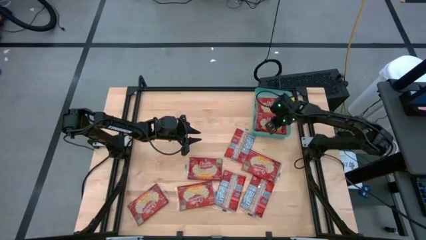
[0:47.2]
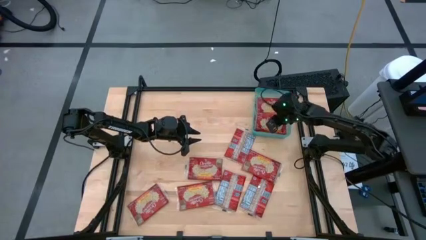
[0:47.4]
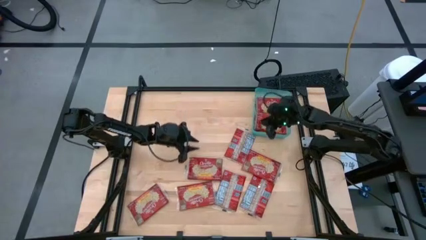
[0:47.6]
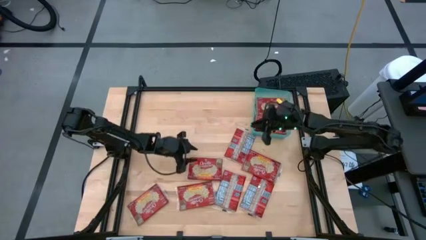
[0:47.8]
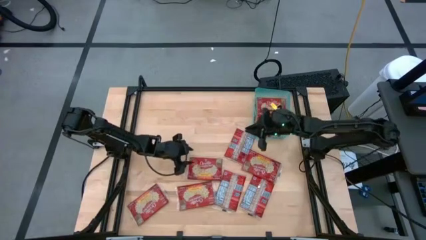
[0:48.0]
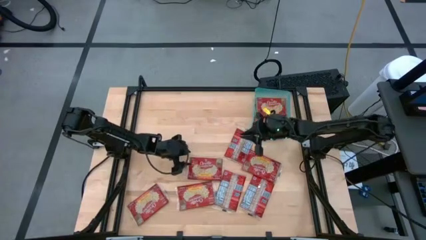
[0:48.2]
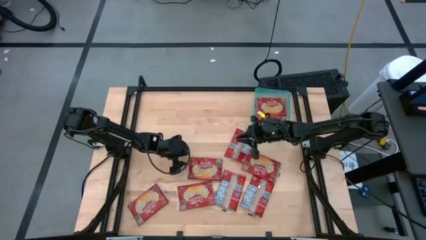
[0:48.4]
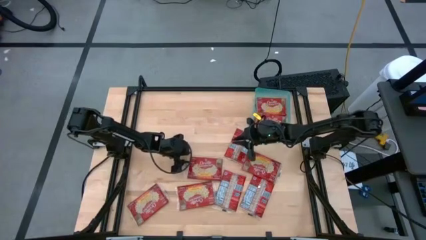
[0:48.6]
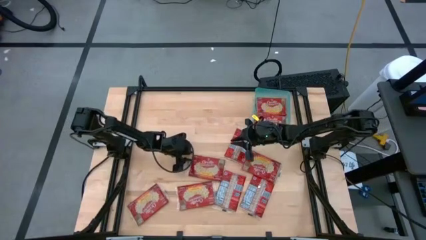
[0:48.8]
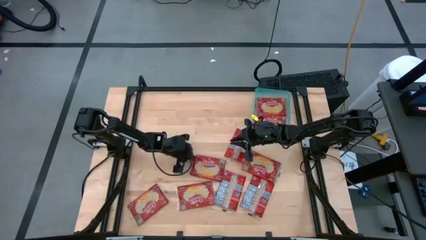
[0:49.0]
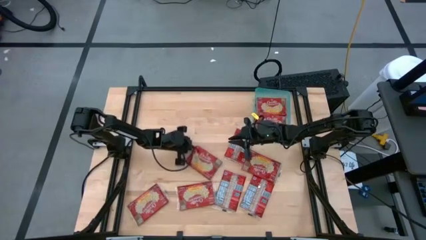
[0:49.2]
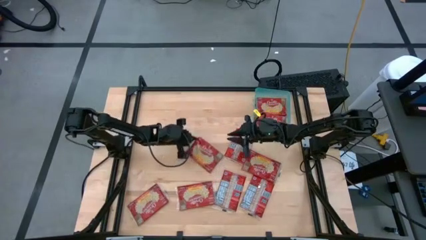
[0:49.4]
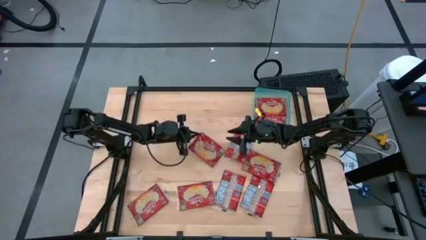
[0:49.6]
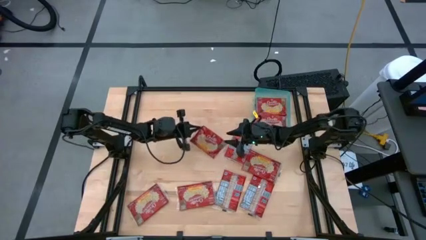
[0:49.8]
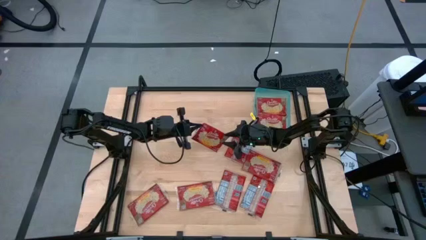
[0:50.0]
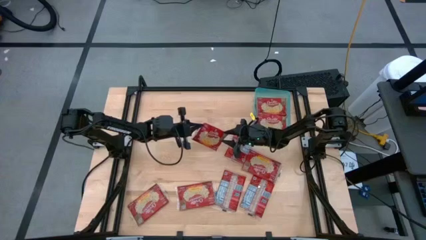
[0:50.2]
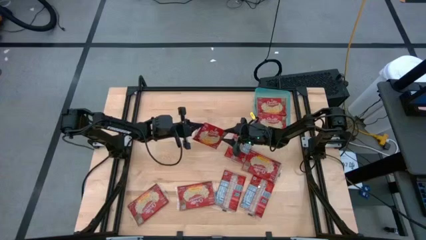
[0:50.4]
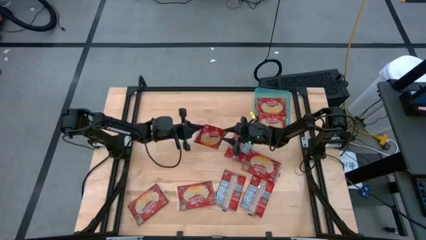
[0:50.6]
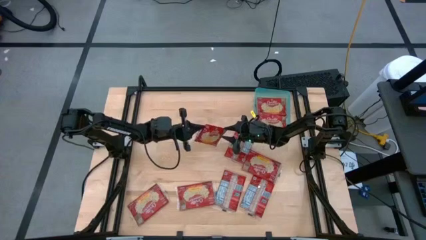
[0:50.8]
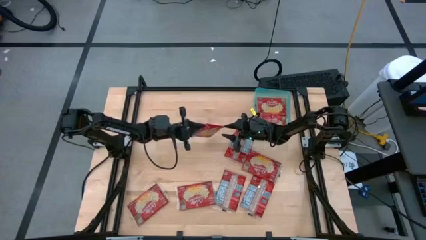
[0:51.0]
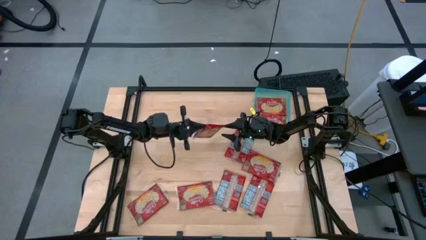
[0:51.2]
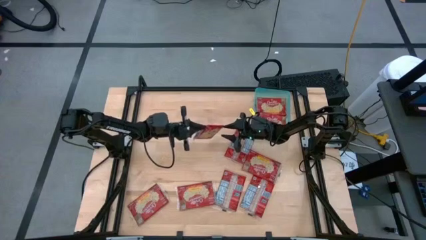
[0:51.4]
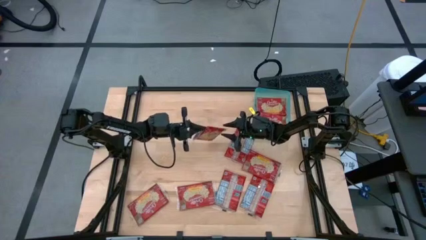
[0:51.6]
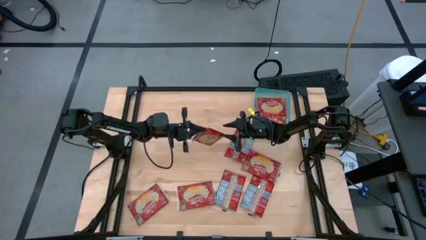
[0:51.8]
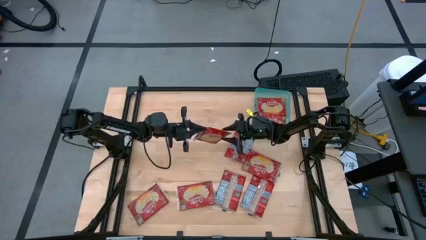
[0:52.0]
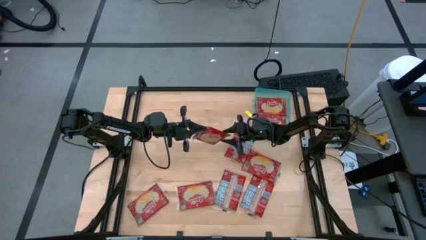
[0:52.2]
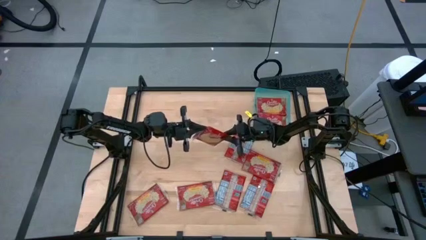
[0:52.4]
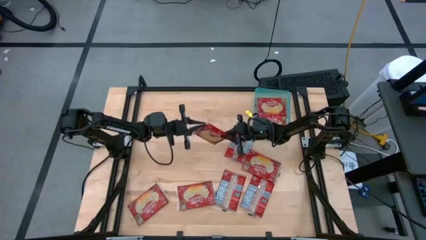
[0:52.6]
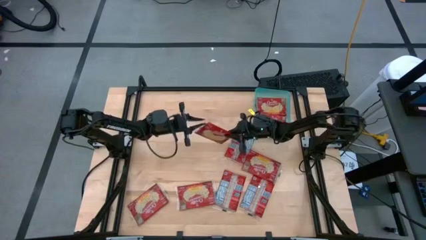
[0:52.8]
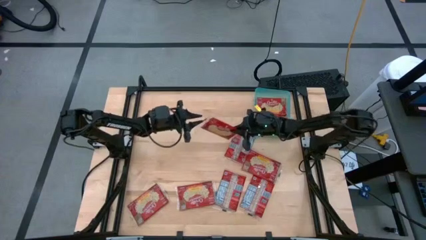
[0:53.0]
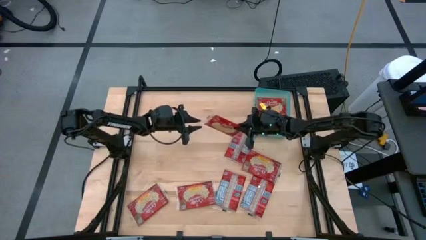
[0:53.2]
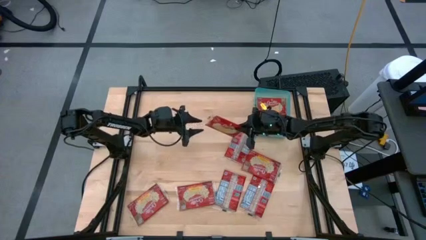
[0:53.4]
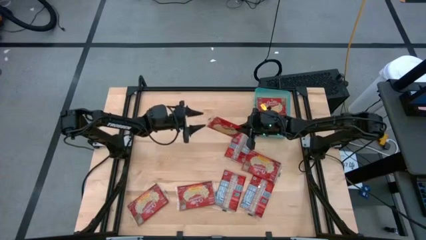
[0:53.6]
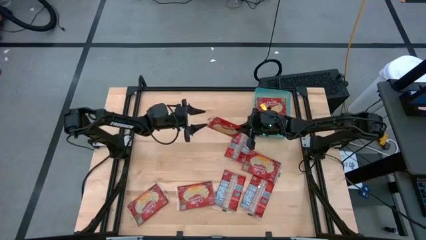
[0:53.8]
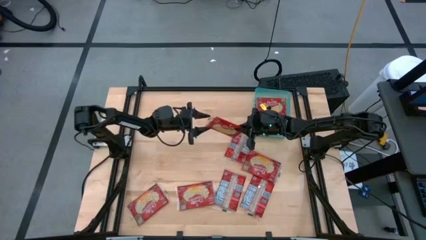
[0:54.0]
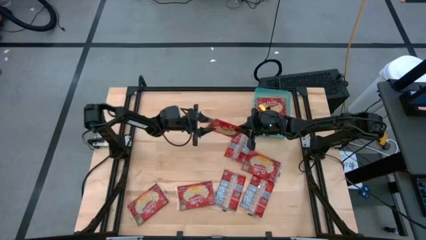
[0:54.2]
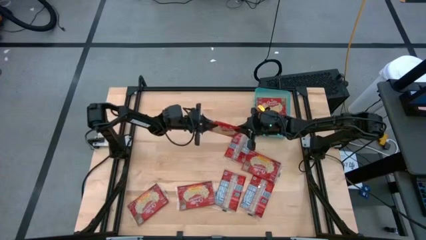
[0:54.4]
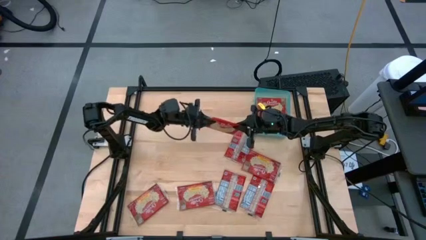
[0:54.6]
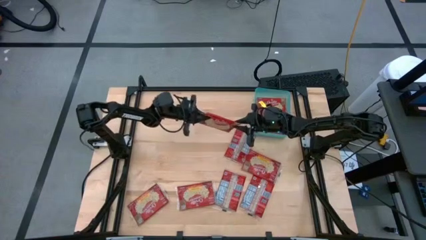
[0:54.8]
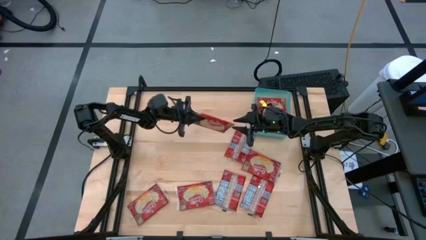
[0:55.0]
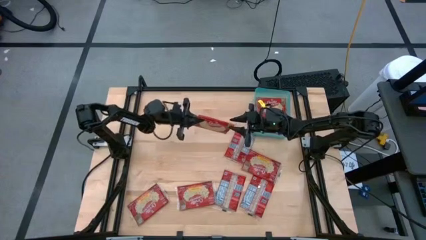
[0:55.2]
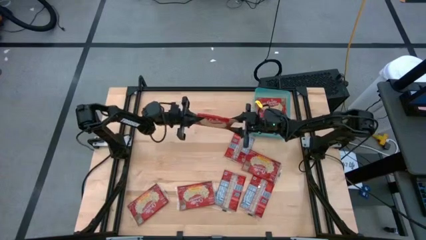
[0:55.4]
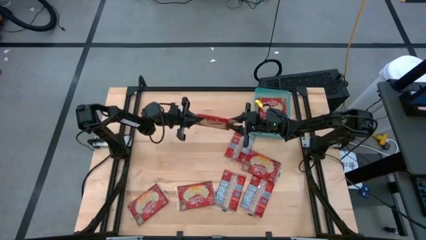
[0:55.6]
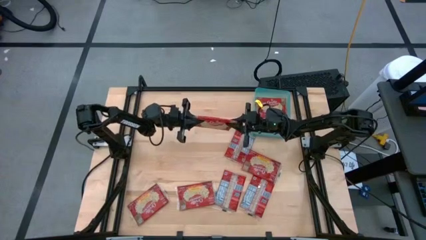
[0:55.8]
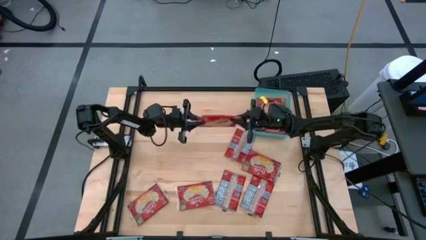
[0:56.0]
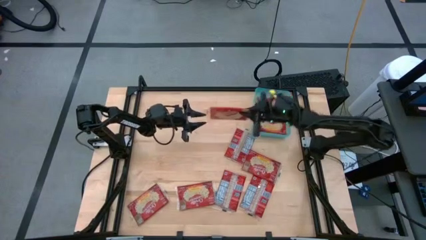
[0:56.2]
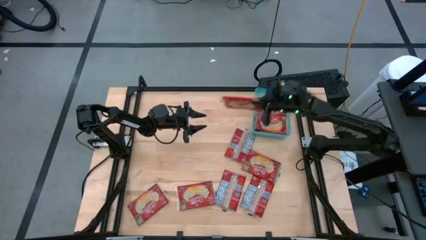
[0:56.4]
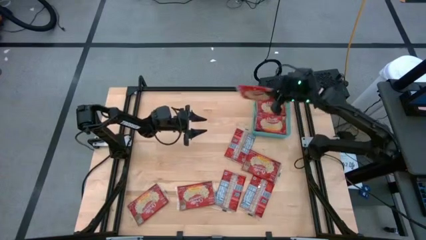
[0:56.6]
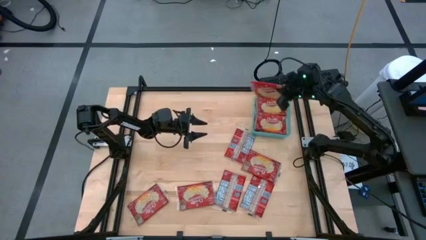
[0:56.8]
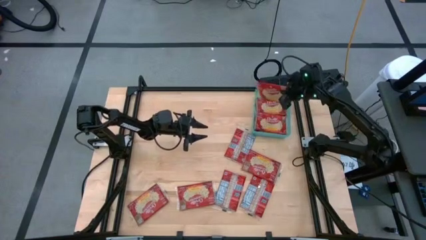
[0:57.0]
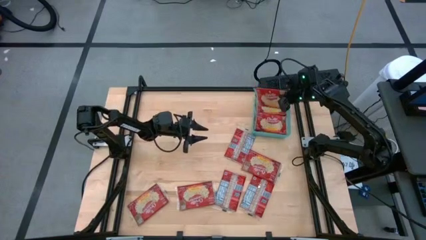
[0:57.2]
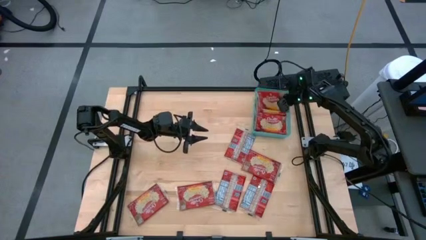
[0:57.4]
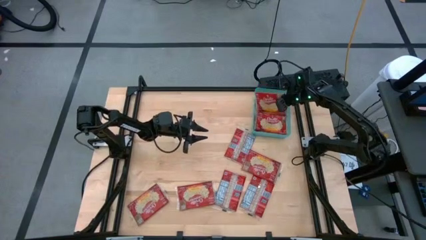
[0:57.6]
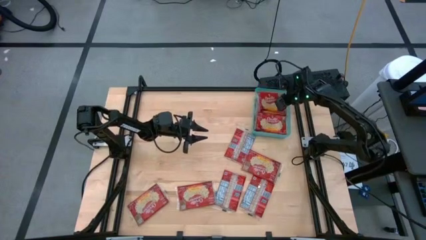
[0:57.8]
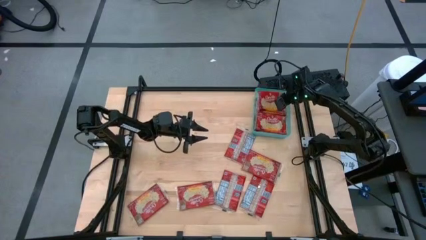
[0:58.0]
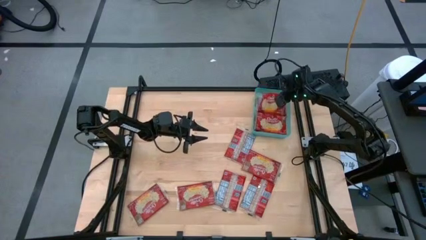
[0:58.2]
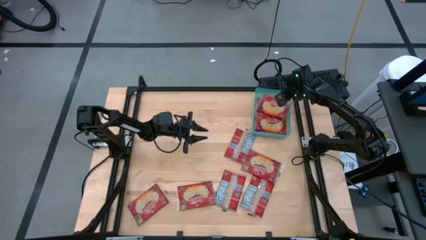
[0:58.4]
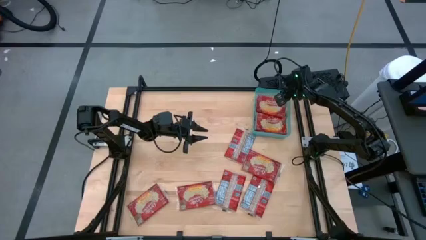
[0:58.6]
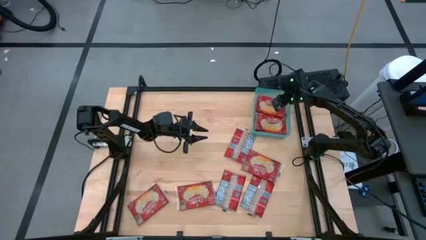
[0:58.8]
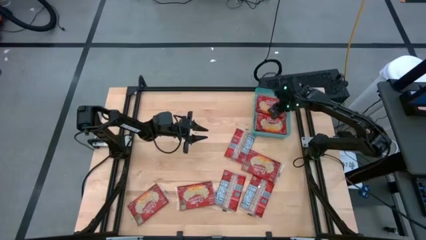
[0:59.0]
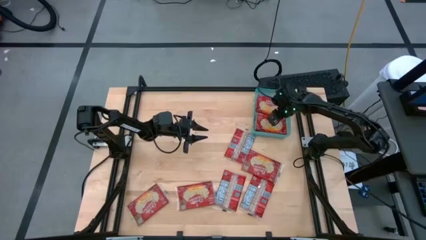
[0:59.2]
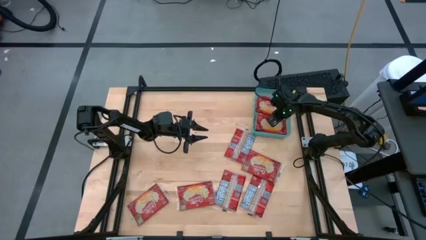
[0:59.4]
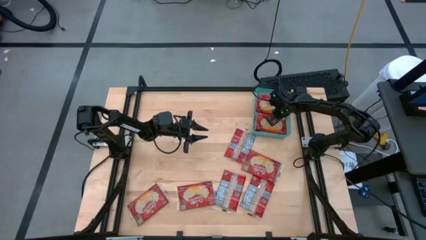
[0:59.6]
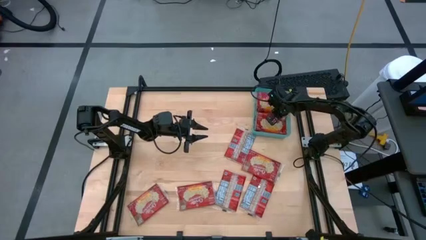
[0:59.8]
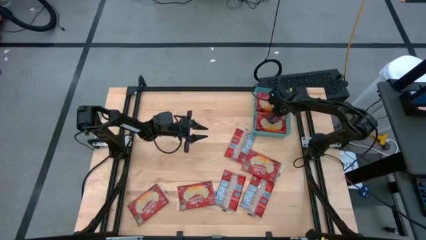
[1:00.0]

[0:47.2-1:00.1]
Task: Sort popcorn bags into baskets
Put the red popcorn bag into the green bin
